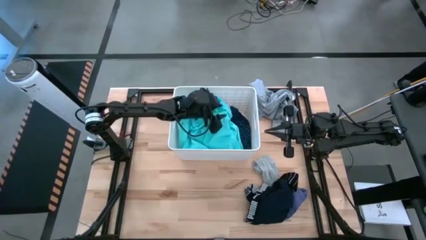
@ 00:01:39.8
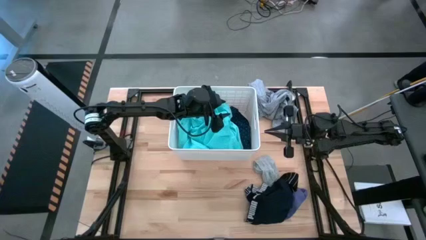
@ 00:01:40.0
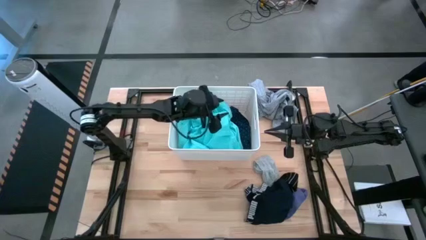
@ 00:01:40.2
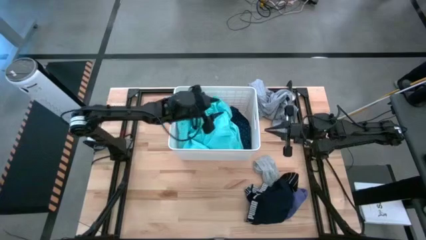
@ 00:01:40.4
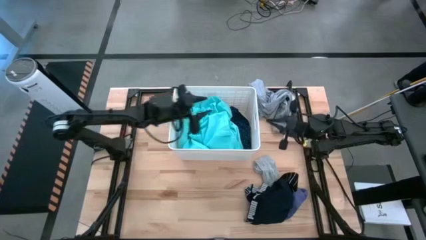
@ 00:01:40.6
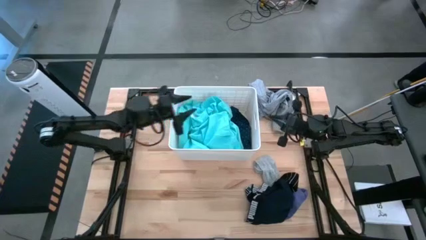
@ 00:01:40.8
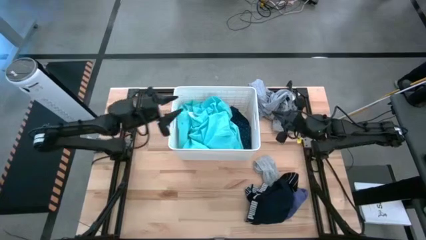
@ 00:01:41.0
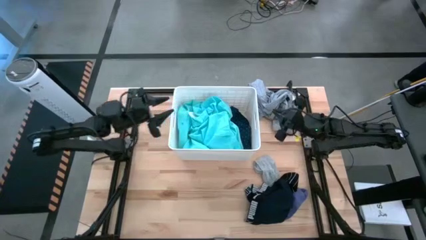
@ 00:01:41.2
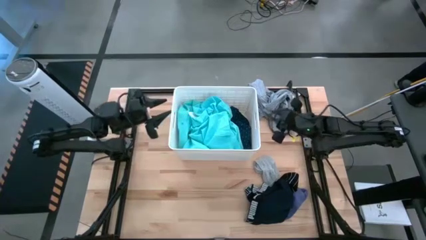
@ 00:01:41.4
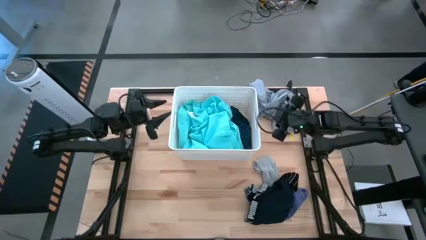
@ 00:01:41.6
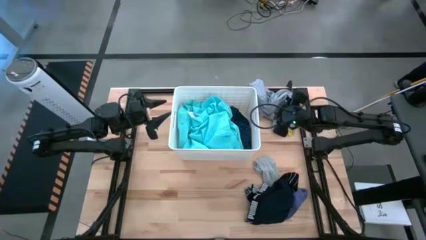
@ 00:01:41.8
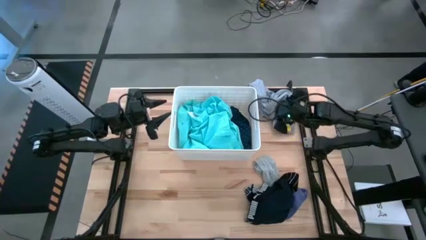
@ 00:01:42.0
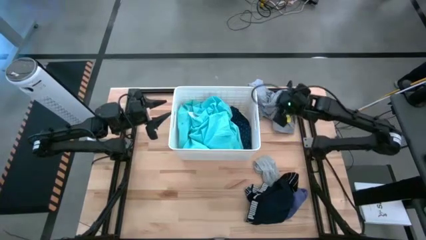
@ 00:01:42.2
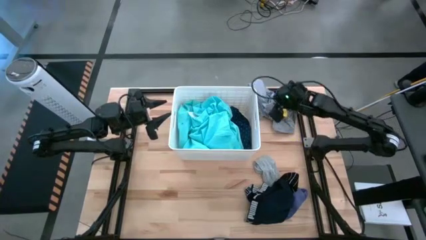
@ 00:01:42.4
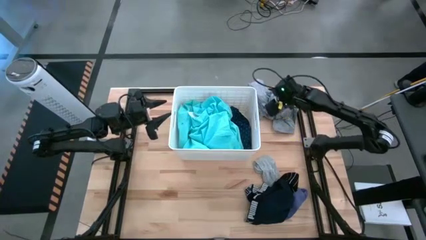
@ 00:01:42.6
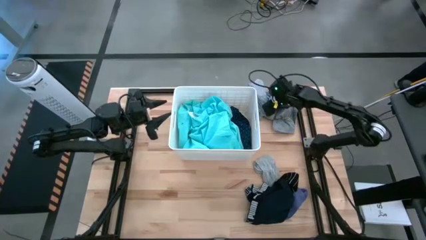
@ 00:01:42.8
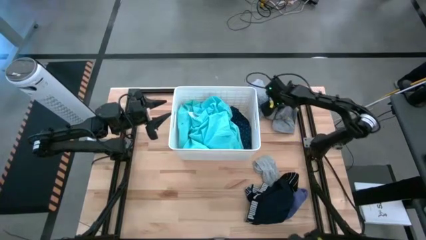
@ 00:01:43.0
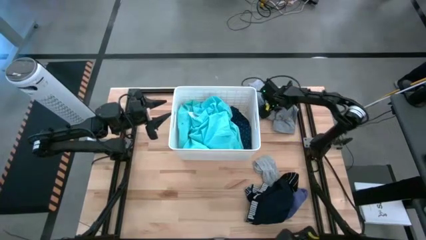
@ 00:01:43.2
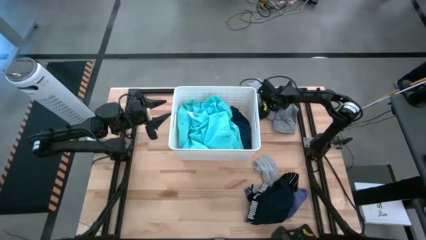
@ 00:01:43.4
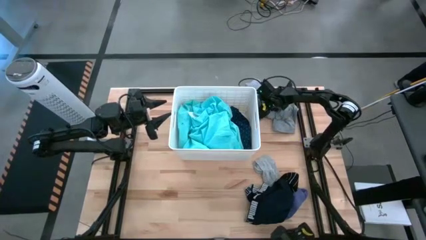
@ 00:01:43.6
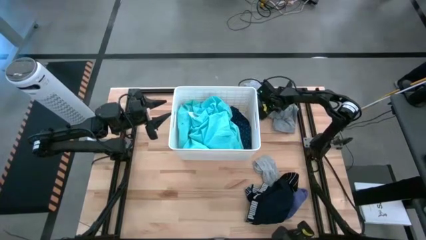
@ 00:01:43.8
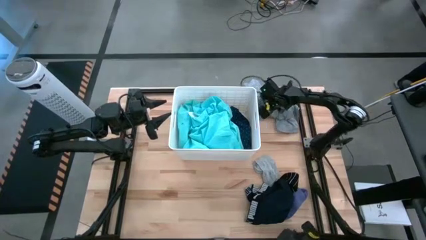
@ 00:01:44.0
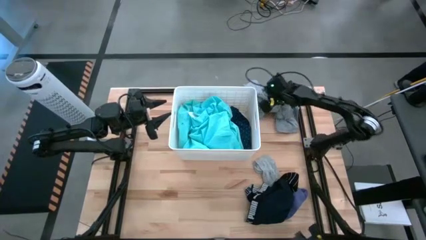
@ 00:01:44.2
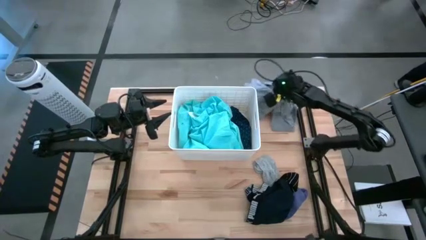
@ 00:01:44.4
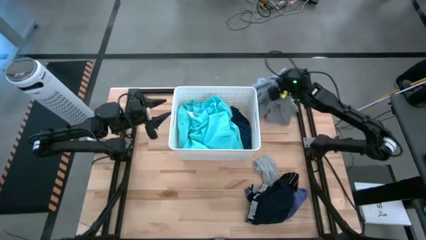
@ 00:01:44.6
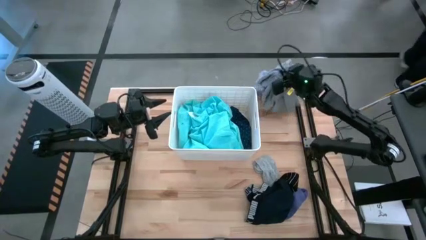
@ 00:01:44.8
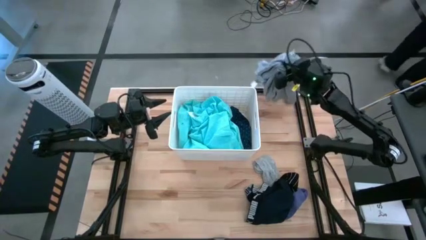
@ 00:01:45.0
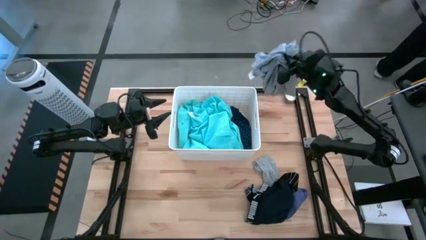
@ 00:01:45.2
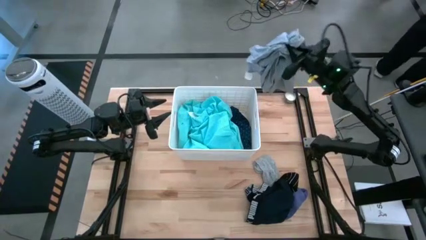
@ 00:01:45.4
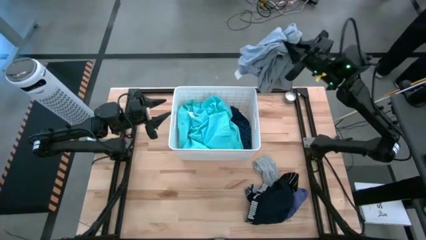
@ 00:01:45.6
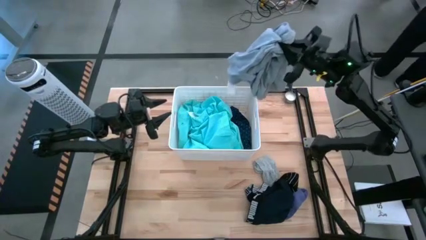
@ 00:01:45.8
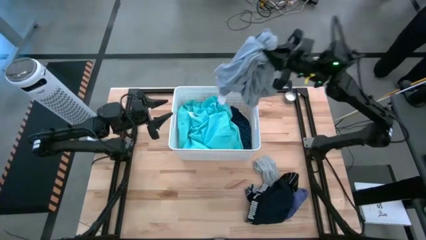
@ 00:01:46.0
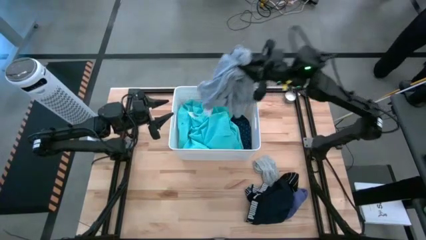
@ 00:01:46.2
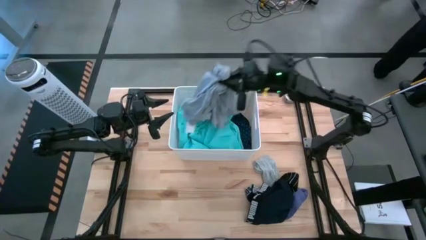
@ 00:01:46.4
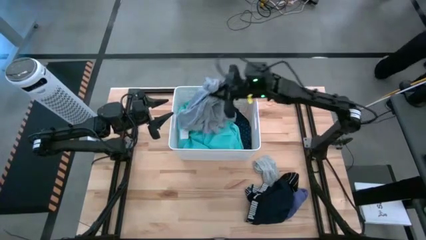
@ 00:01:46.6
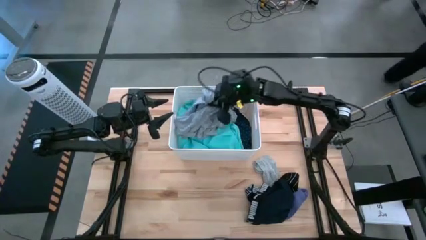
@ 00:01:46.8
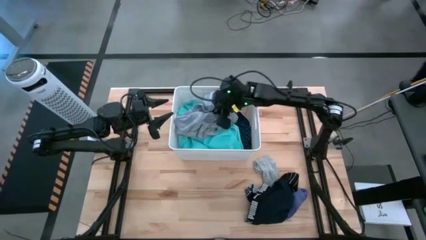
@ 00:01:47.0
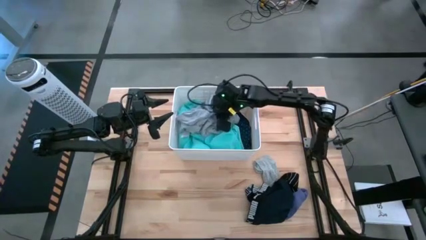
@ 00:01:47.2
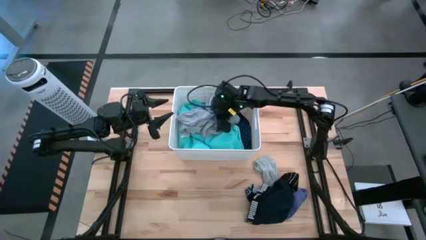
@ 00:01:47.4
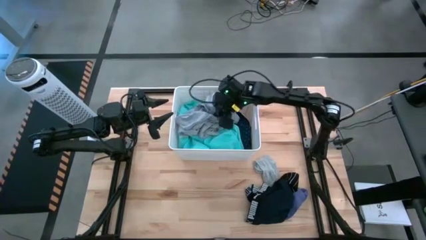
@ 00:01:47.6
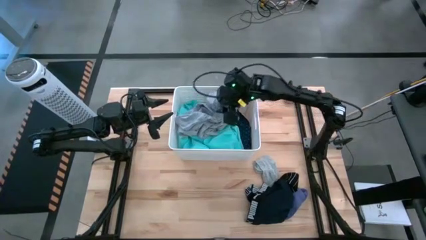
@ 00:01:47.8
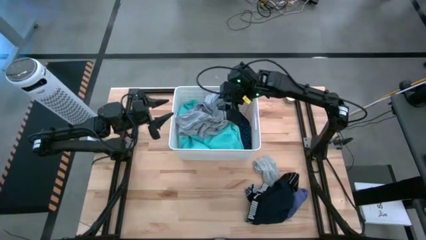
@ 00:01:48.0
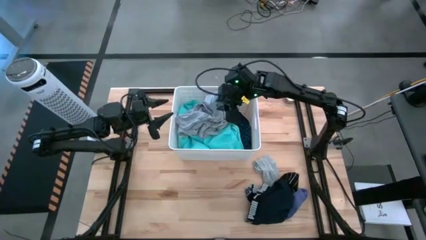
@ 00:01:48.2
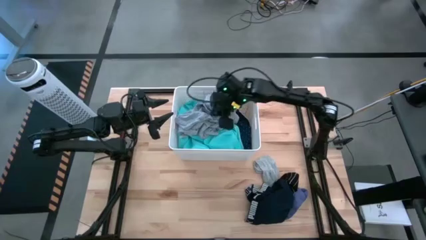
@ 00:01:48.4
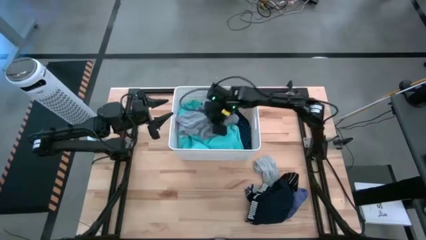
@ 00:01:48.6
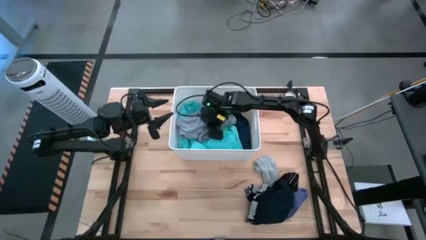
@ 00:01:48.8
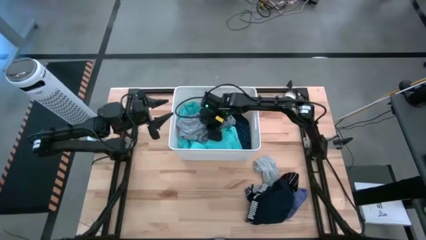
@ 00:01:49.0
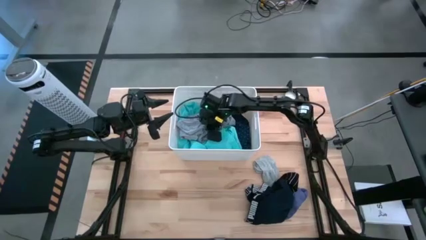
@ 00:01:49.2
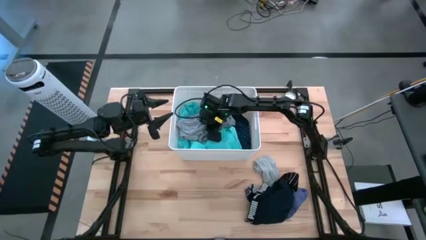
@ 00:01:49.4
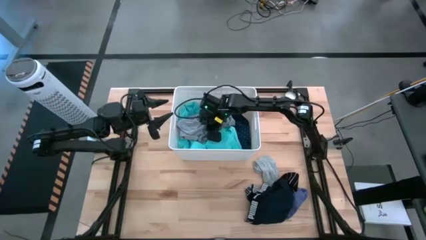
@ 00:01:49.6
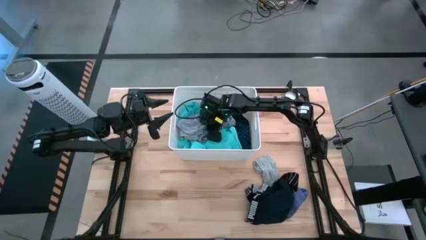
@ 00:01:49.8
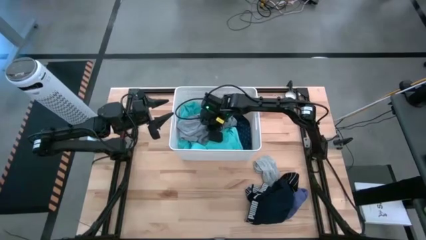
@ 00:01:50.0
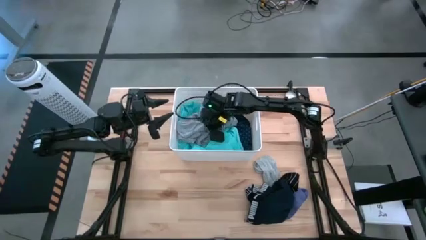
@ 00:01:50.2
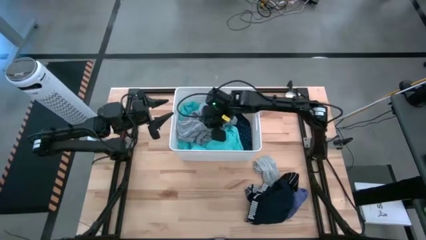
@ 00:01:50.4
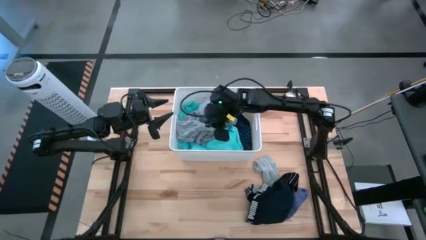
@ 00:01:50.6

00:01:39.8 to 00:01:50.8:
Task: Sort clothes
Put the gray shirt into the white laundry bin

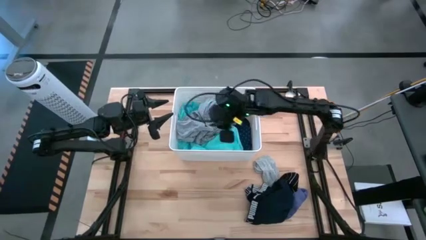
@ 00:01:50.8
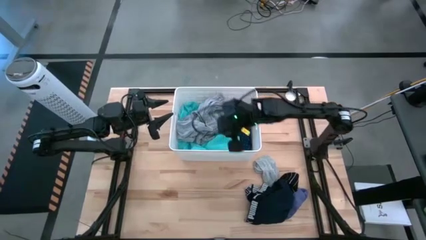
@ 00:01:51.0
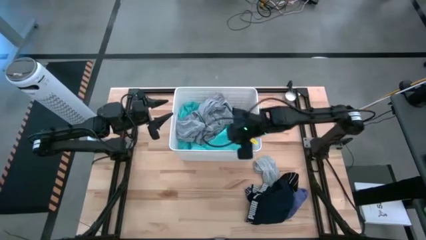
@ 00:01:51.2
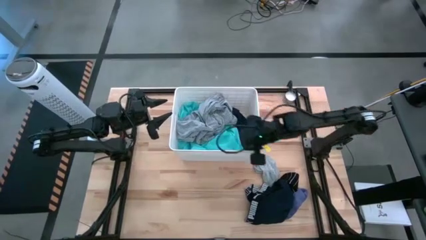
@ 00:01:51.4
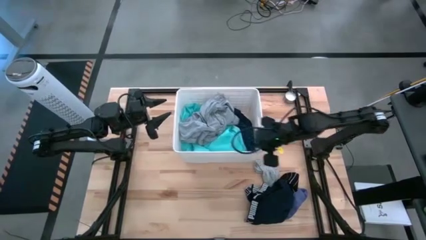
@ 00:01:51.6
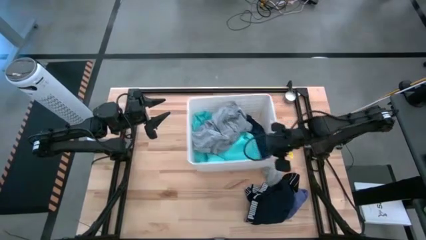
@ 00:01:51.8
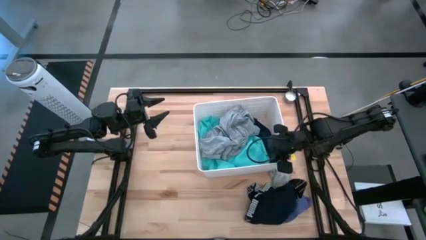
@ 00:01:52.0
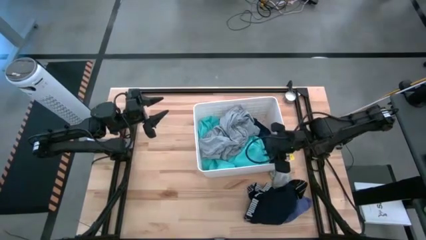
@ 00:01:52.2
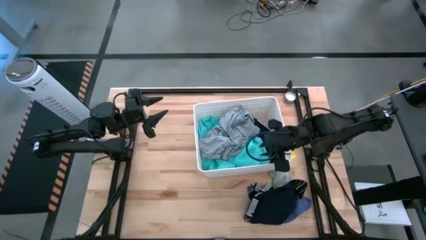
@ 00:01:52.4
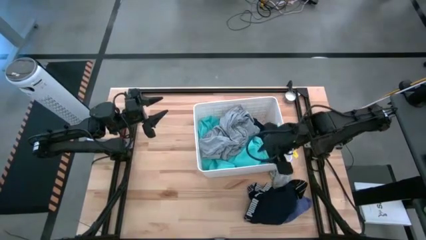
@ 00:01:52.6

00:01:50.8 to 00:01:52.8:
Put the dark blue boxer into the white laundry bin

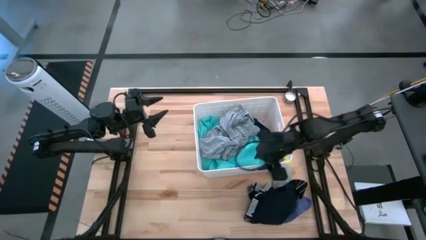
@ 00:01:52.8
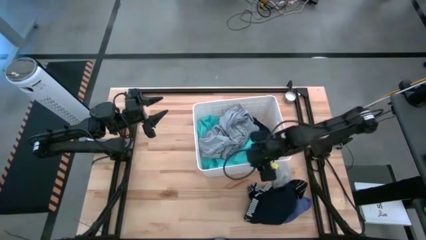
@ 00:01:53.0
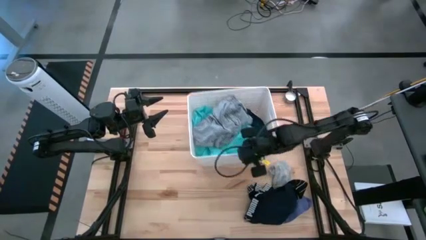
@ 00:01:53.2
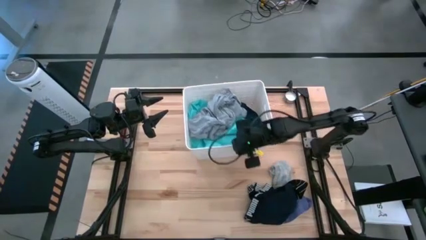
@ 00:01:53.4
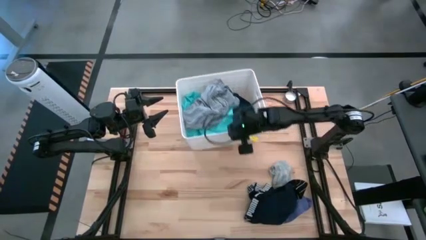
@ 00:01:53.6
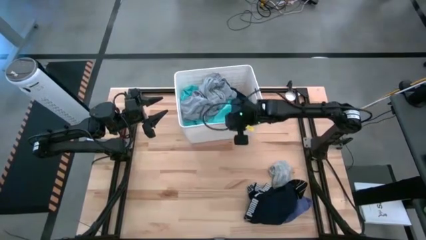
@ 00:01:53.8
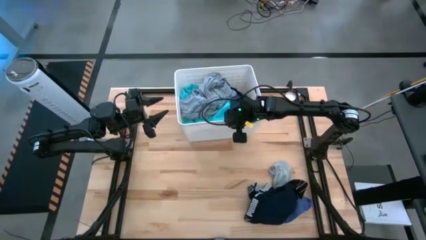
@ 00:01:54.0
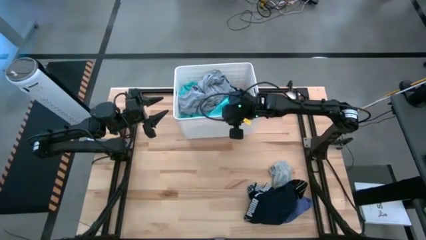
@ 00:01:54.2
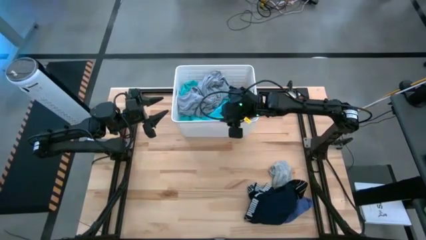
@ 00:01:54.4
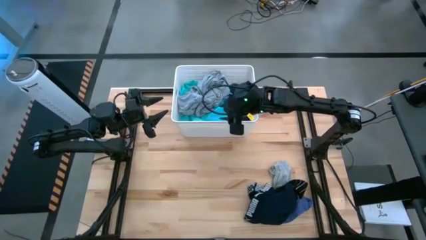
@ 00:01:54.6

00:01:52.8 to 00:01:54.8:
Adjust the white laundry bin

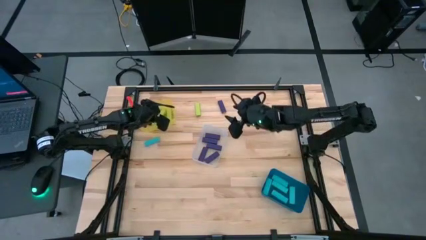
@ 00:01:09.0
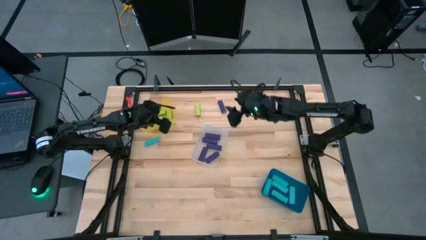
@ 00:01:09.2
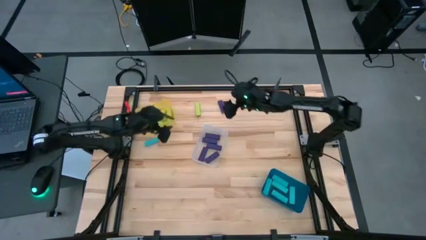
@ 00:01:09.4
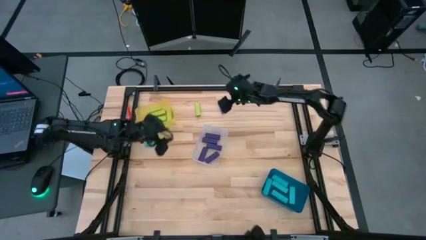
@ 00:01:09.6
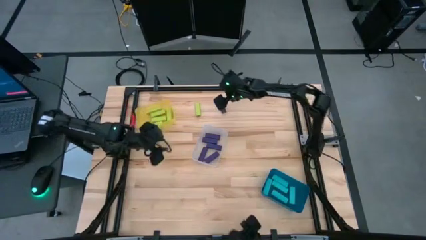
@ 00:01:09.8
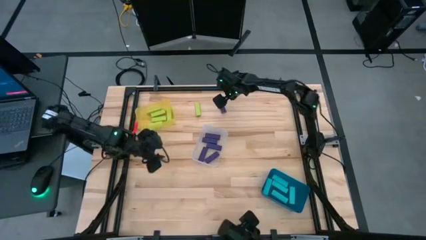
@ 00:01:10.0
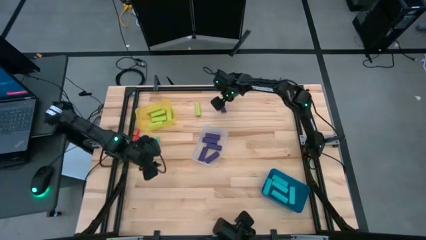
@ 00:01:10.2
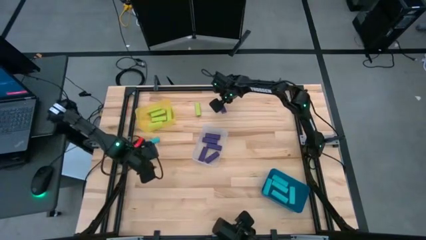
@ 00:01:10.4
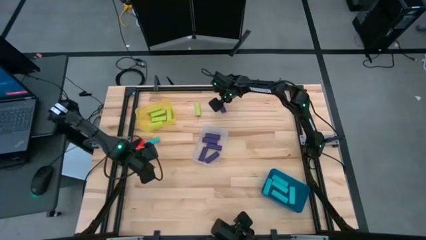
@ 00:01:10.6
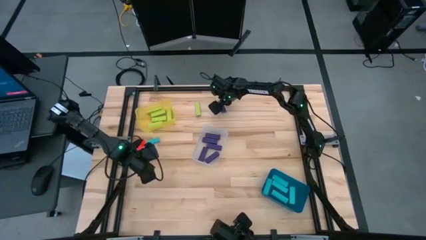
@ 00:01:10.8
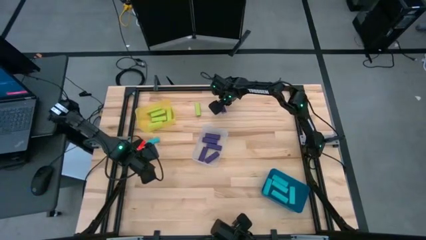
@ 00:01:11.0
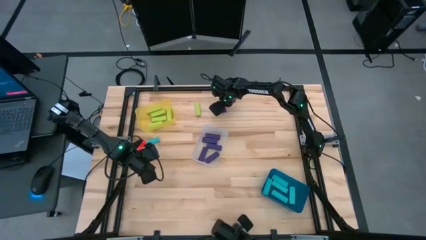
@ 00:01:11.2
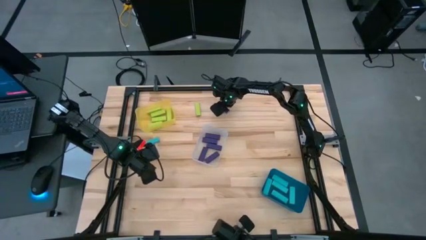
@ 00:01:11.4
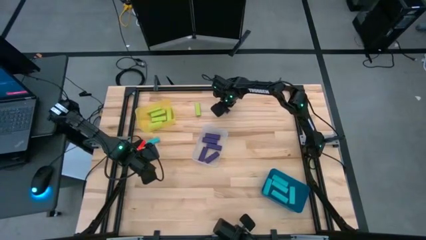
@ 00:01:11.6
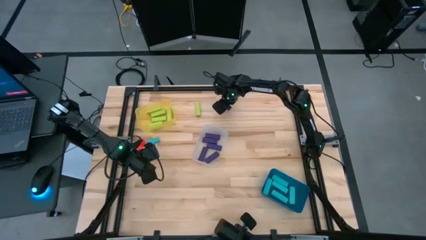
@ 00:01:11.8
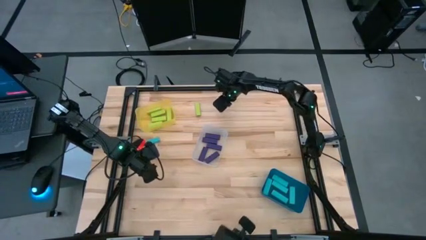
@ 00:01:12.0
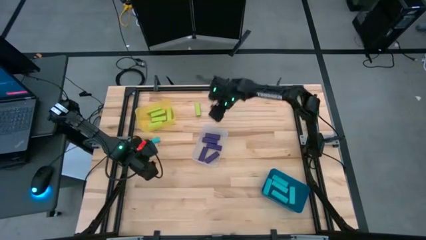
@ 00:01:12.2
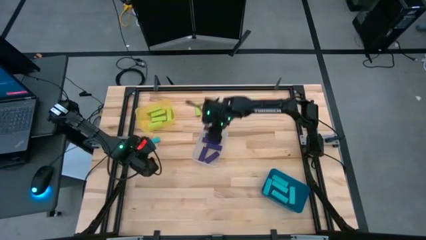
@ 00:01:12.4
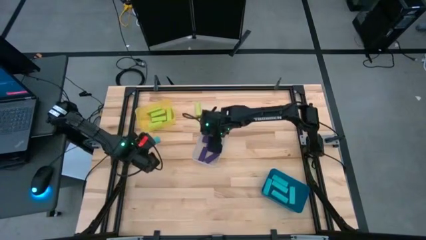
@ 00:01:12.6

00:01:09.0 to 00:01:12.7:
Task: Sort blocks
Put the violet block into the transparent bin
